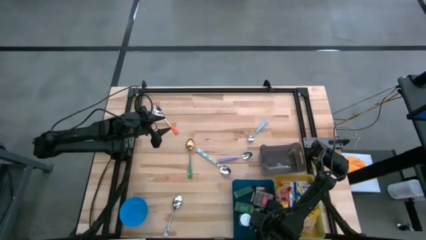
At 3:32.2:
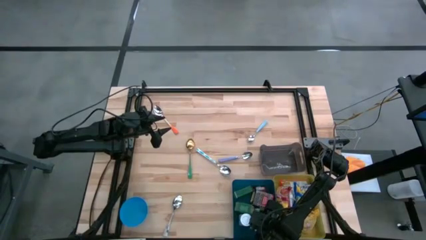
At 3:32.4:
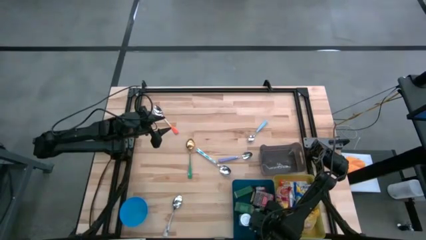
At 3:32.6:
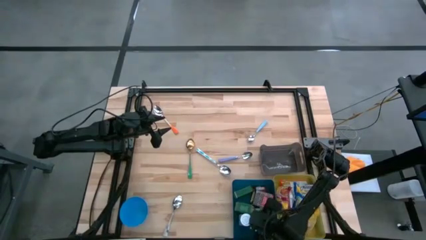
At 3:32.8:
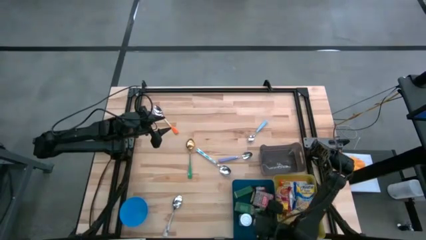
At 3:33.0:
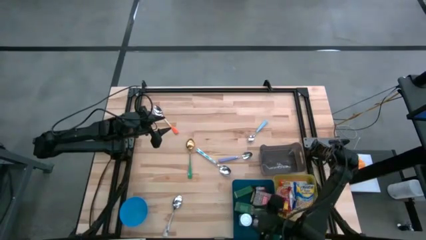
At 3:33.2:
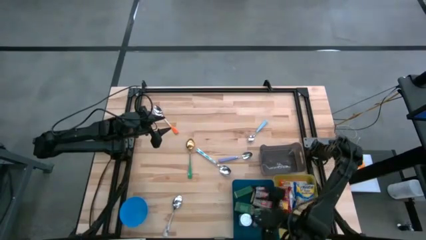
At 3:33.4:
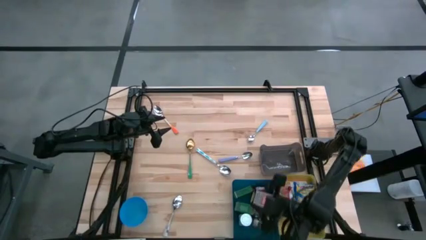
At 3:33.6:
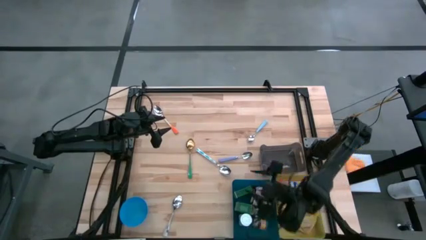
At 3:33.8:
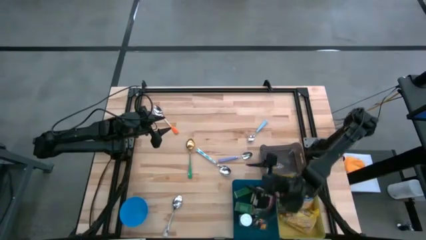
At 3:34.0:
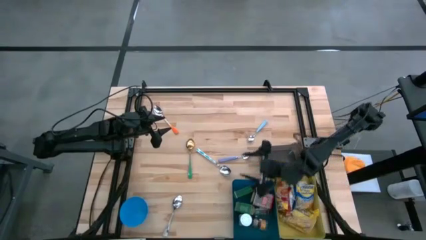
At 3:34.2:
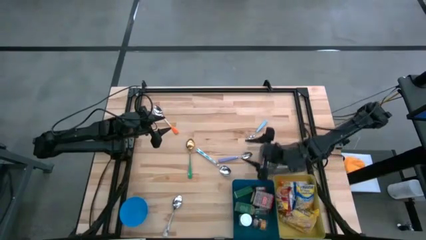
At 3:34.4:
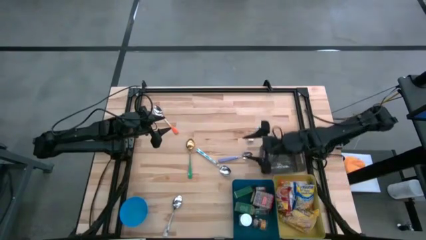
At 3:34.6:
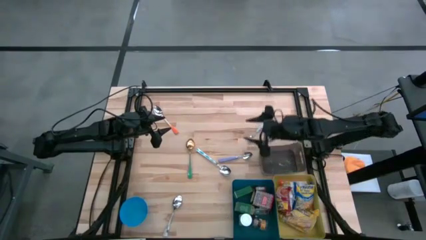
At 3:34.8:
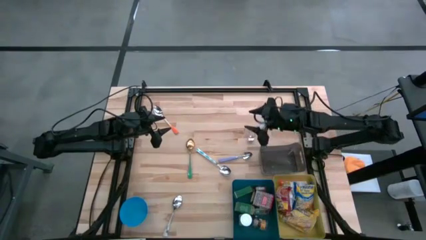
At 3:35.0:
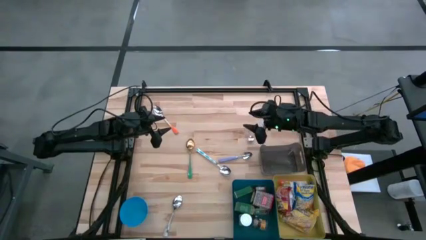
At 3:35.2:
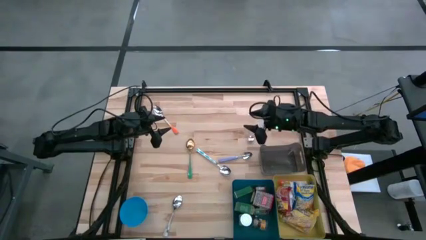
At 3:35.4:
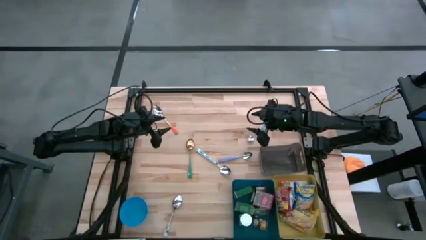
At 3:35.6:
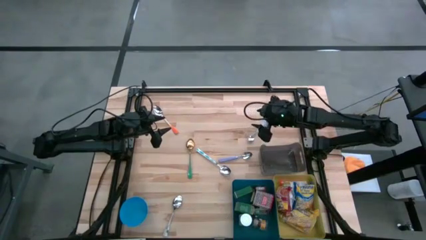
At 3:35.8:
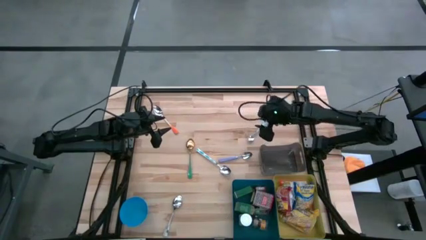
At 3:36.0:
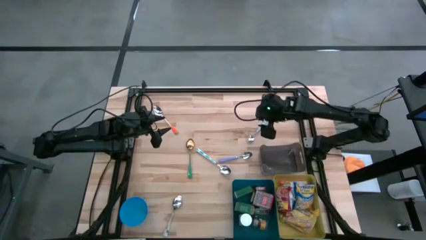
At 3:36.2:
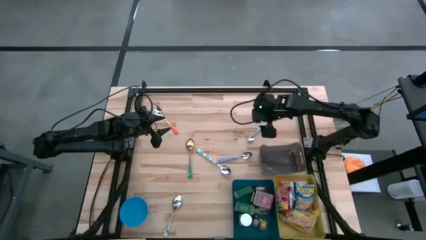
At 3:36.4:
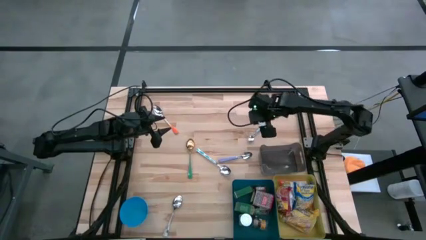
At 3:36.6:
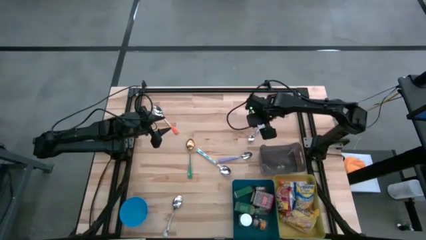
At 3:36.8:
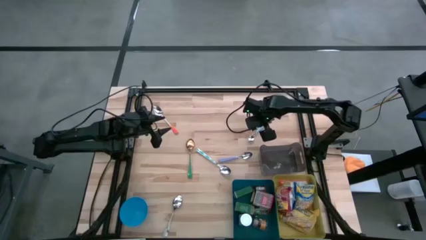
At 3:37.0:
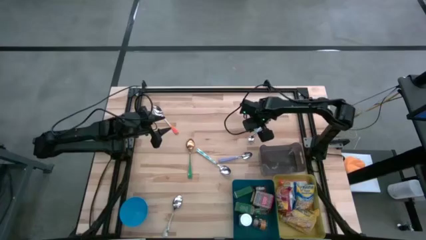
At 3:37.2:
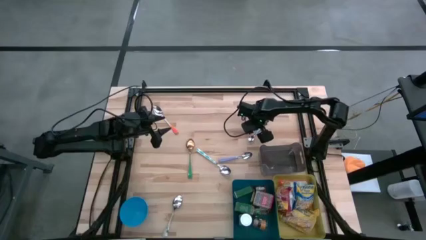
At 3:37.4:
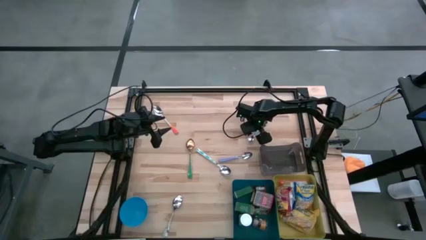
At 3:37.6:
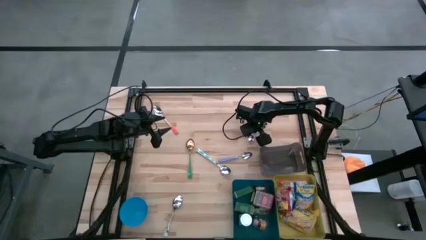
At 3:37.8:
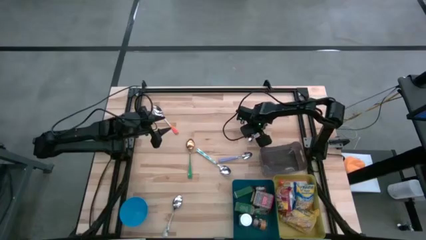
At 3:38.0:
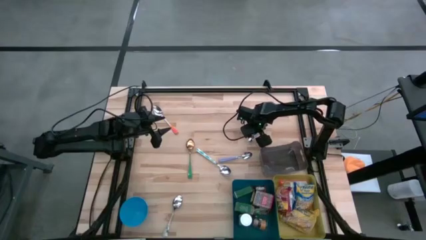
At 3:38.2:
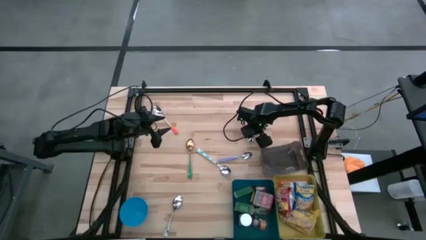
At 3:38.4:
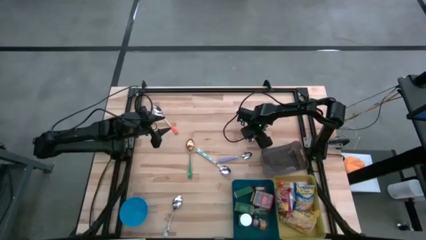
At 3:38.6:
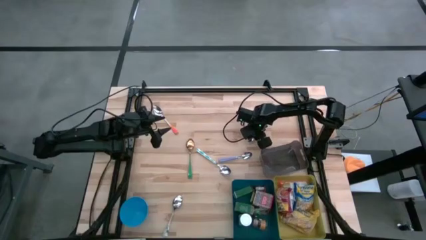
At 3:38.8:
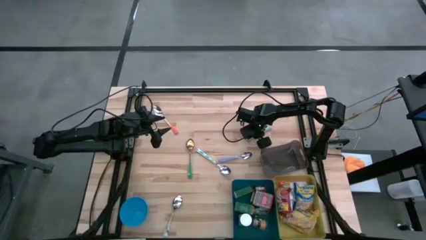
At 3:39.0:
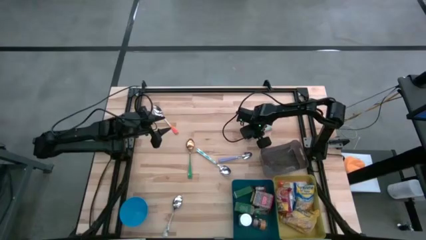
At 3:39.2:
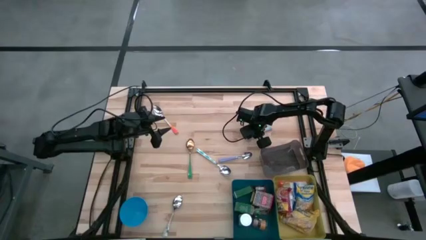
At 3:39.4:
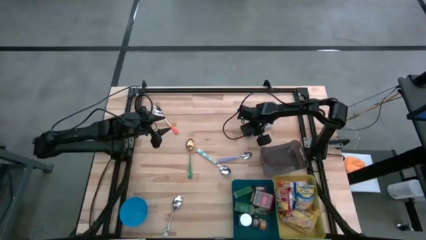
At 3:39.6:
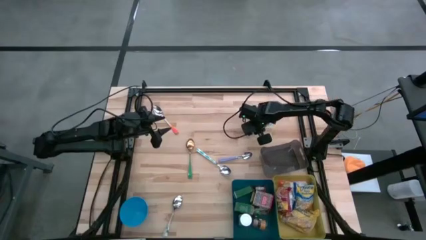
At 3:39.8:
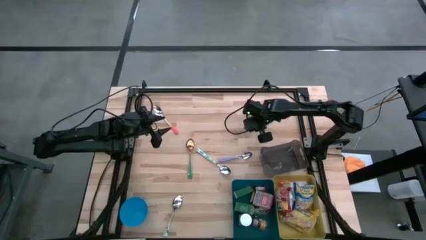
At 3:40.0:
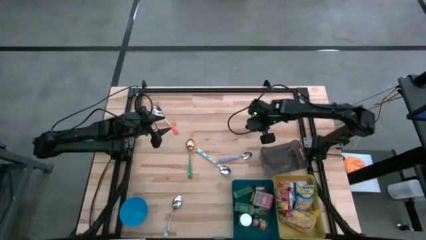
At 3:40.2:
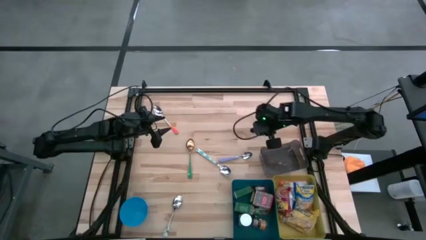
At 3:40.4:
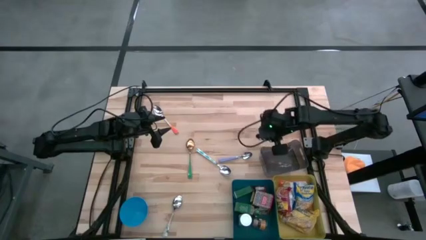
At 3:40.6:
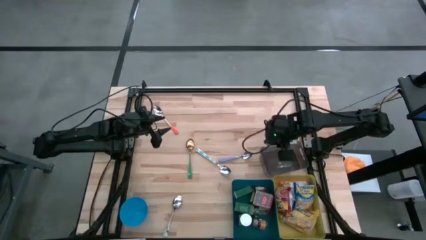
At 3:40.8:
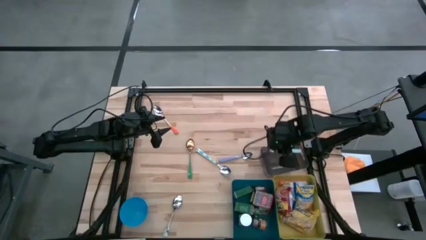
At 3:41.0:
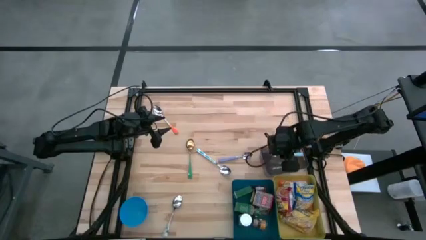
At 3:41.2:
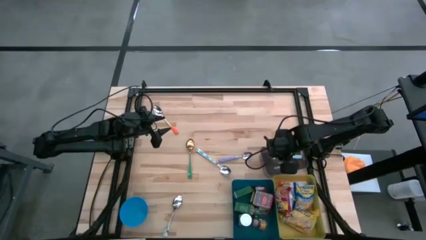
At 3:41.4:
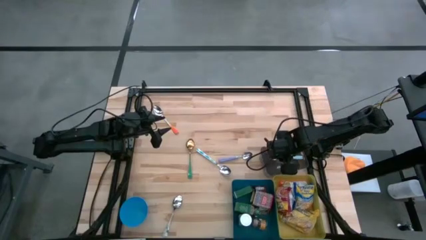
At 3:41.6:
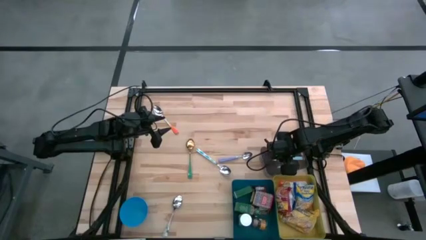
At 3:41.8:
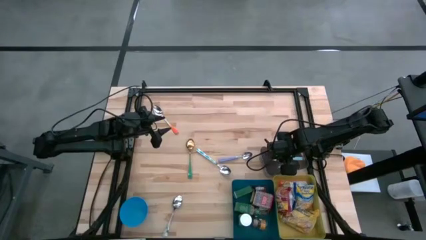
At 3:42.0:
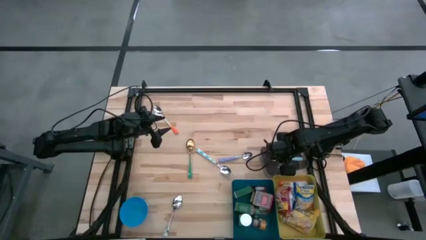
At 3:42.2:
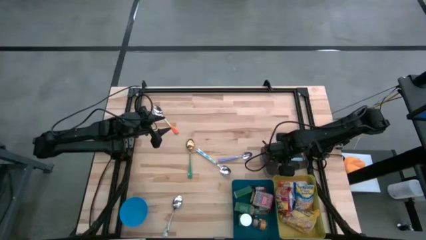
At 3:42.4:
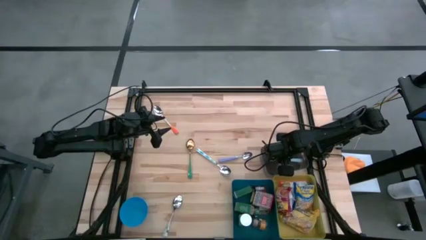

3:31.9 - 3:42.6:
Put the blue spoon into the black bin

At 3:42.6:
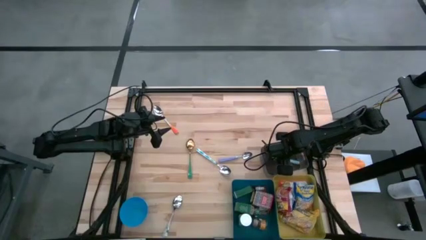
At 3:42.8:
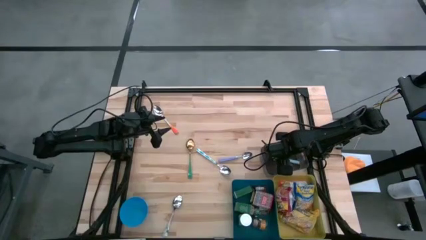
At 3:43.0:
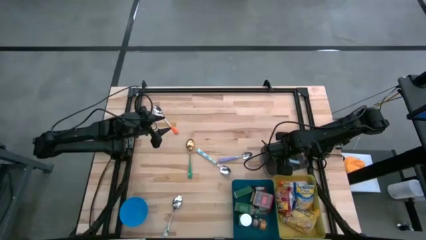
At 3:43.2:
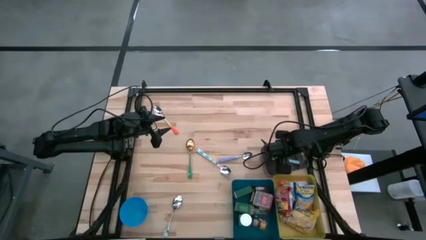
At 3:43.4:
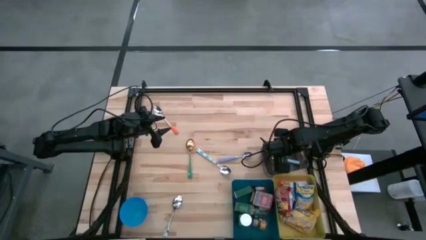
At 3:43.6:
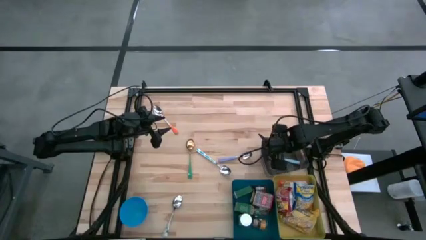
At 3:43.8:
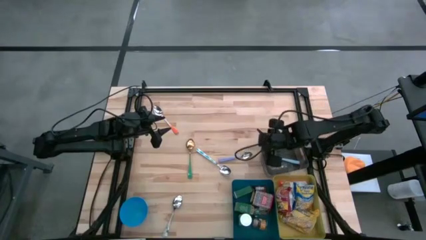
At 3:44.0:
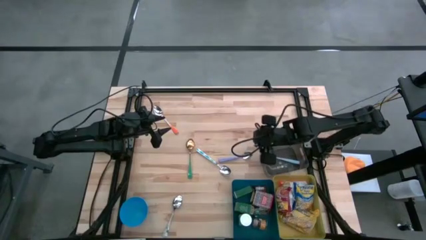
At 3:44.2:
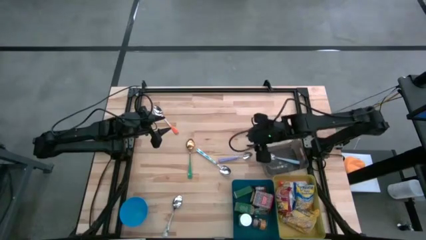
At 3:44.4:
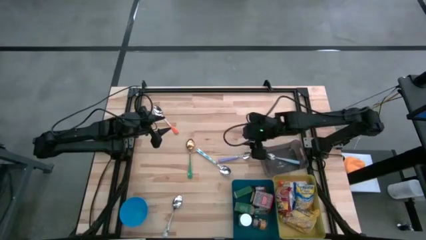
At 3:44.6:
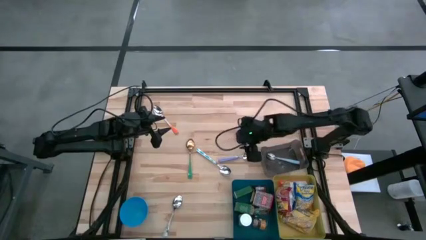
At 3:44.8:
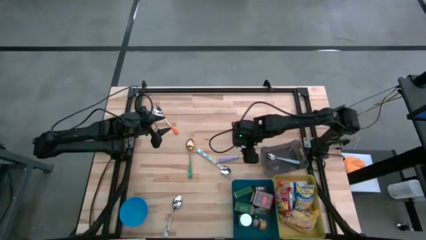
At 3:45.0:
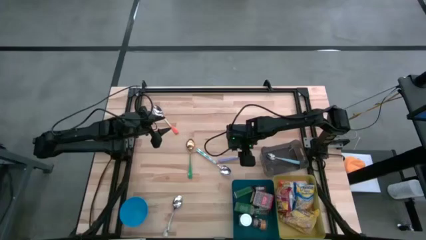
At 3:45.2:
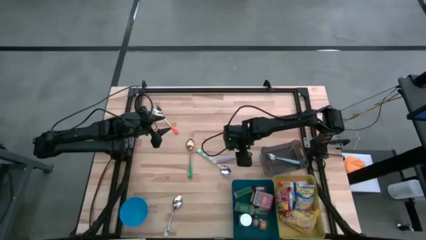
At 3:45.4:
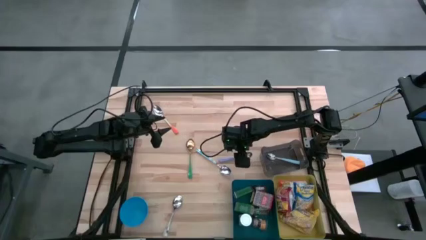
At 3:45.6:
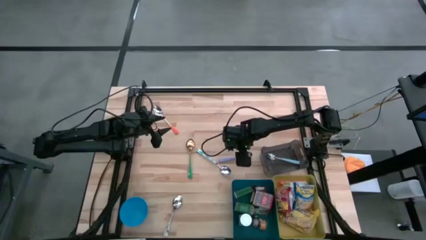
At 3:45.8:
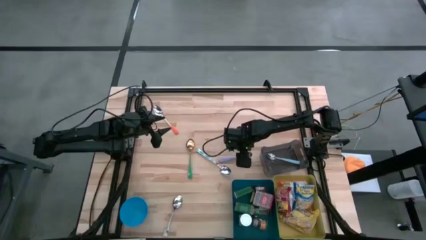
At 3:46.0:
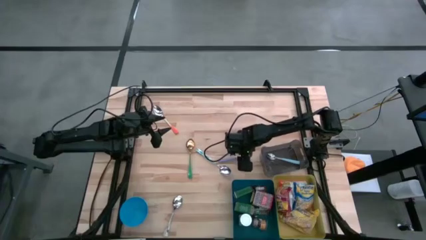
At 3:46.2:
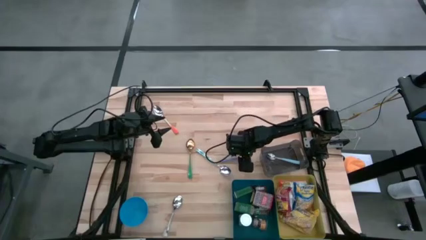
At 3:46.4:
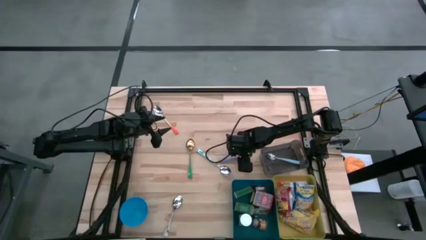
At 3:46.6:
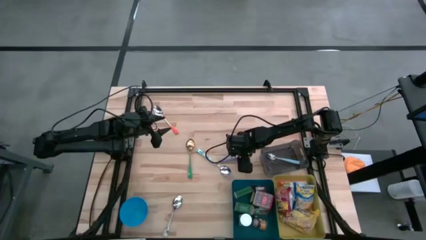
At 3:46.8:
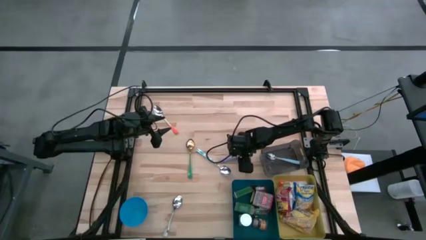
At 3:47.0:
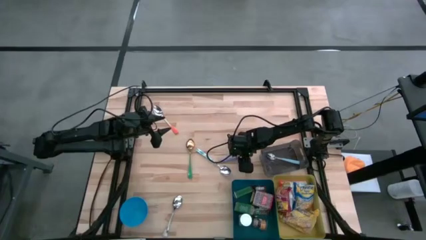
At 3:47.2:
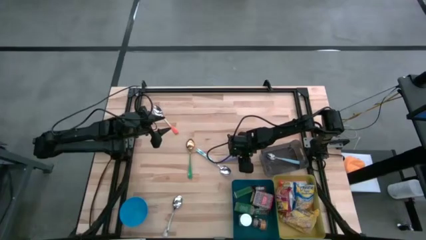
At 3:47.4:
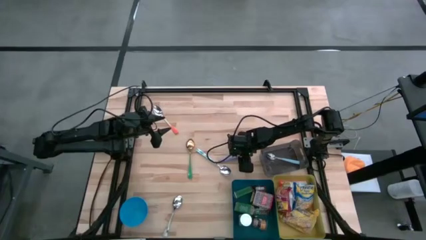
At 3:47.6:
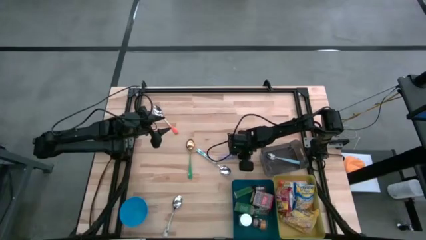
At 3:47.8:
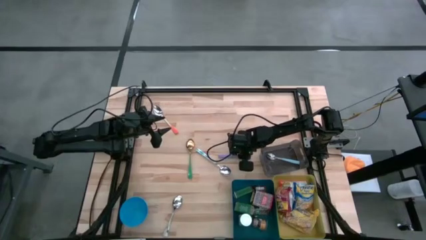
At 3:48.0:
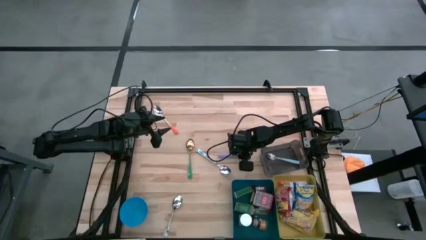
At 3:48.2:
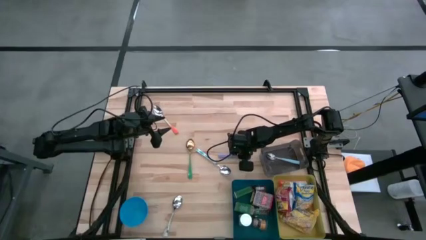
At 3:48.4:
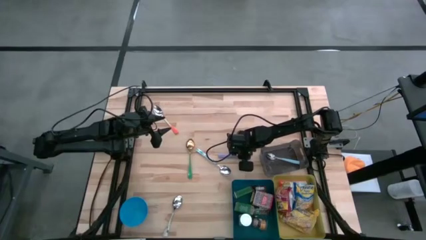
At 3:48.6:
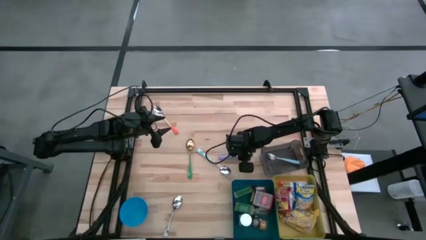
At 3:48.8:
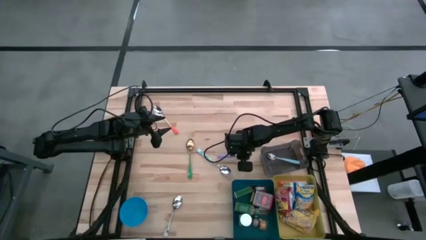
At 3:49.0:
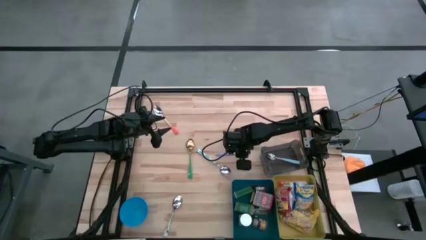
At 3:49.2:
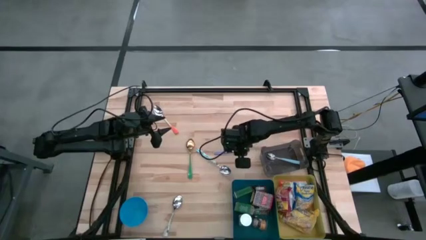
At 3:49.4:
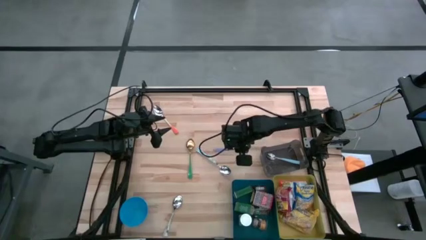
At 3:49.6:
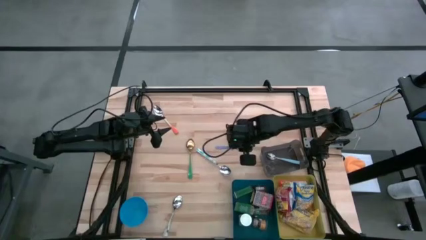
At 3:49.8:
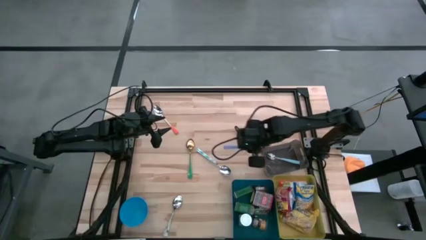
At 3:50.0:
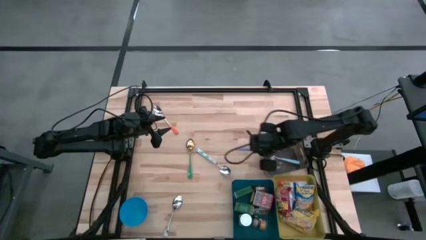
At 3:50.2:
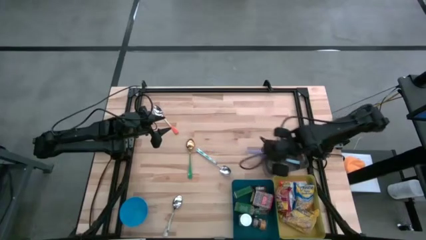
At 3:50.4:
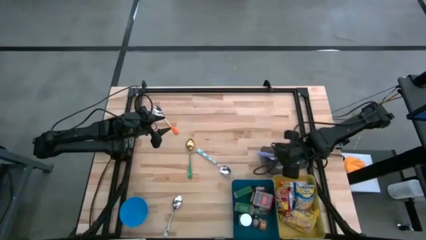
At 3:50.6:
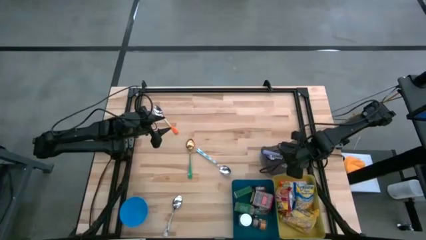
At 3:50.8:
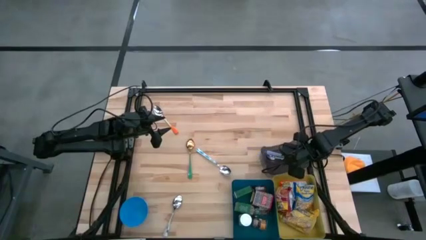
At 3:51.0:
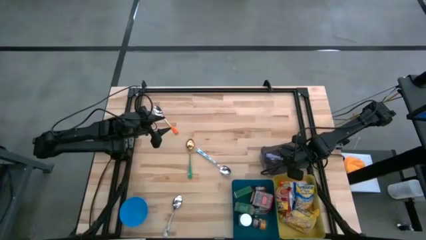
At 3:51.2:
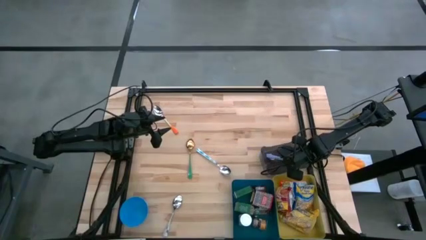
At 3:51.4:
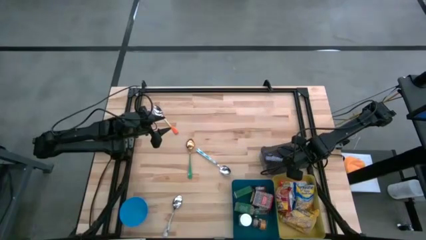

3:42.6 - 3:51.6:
Put the purple spoon into the black bin
